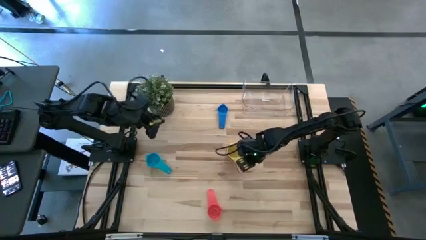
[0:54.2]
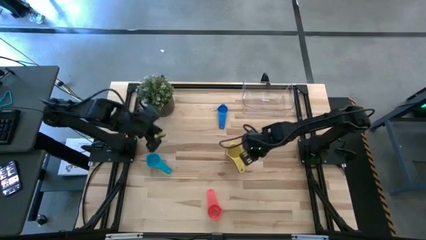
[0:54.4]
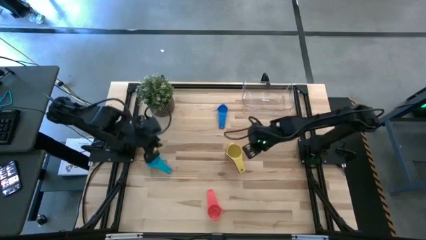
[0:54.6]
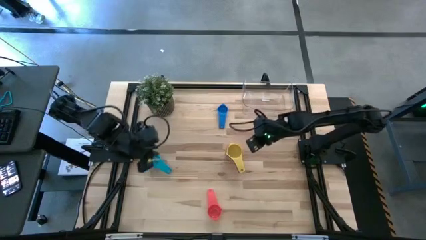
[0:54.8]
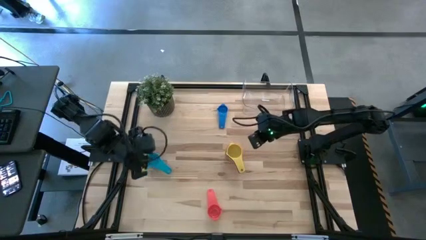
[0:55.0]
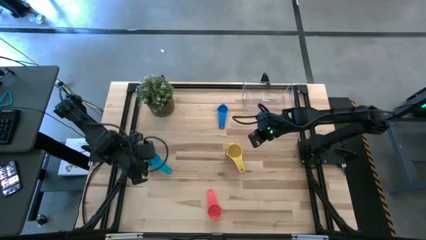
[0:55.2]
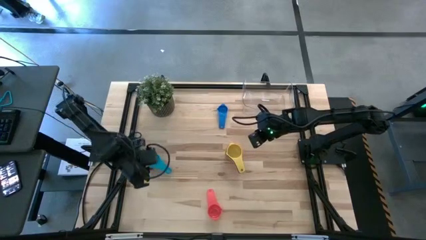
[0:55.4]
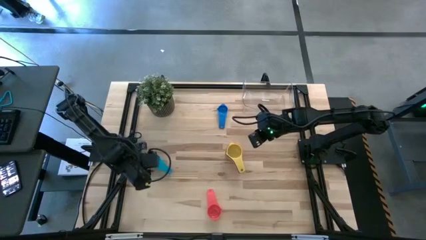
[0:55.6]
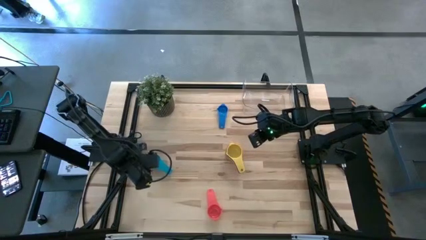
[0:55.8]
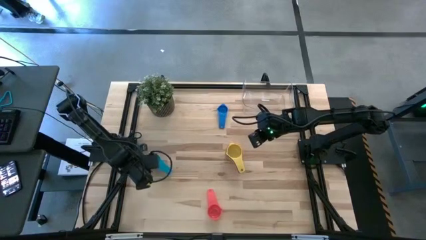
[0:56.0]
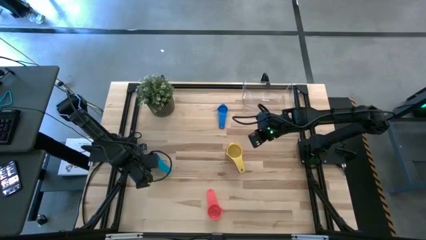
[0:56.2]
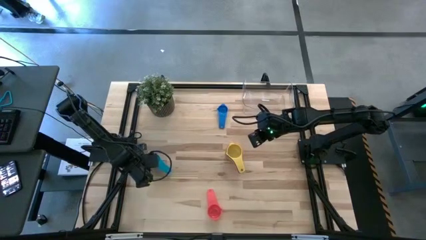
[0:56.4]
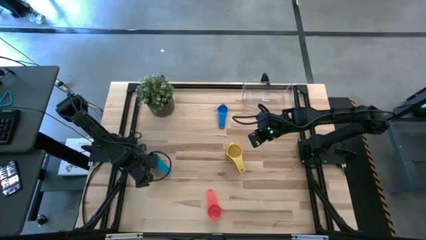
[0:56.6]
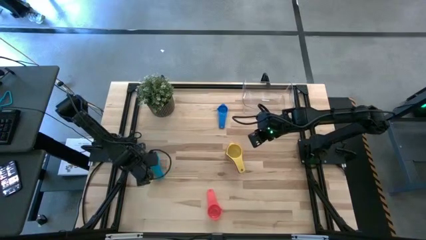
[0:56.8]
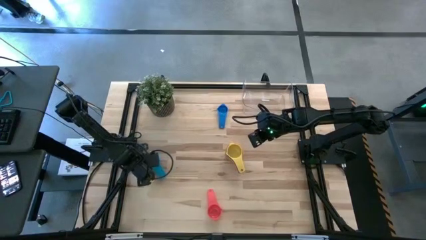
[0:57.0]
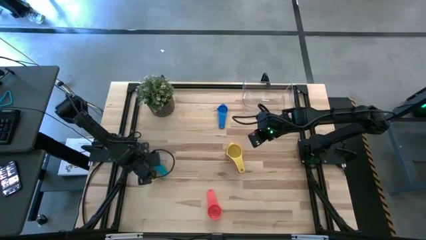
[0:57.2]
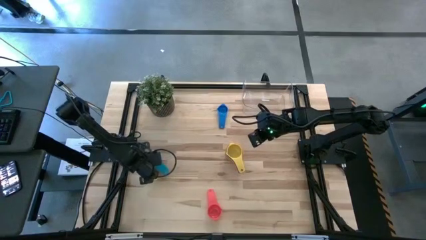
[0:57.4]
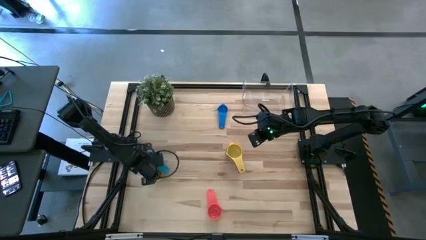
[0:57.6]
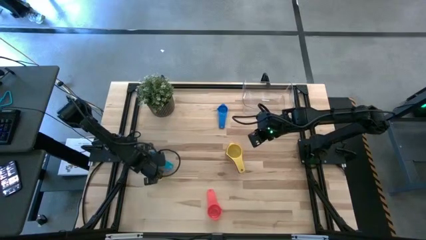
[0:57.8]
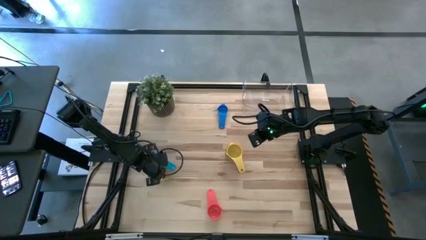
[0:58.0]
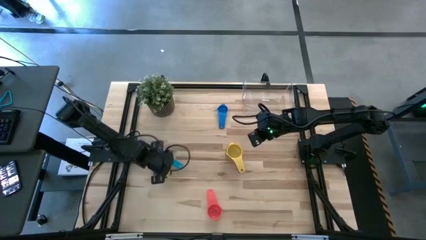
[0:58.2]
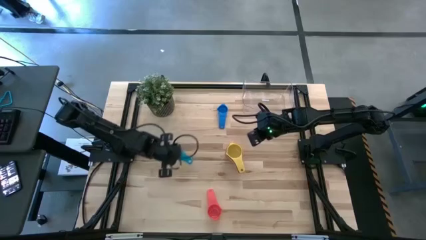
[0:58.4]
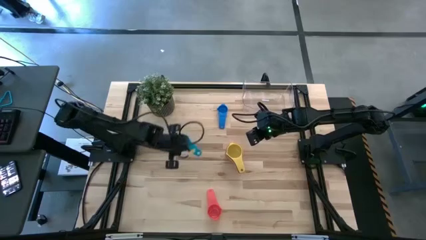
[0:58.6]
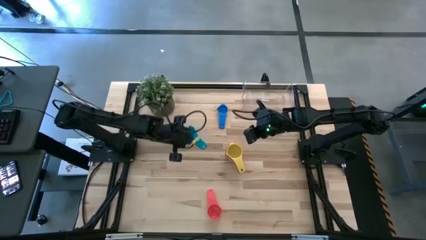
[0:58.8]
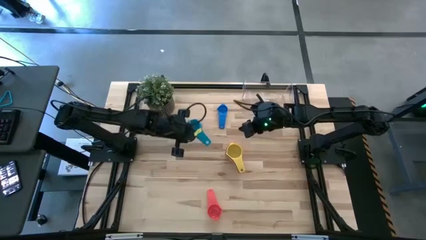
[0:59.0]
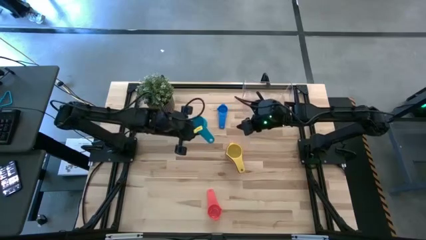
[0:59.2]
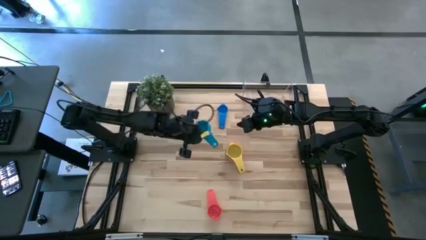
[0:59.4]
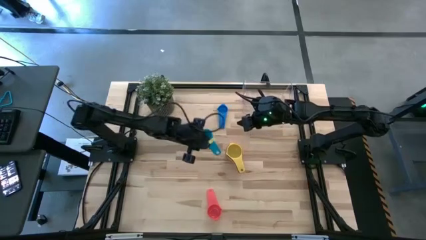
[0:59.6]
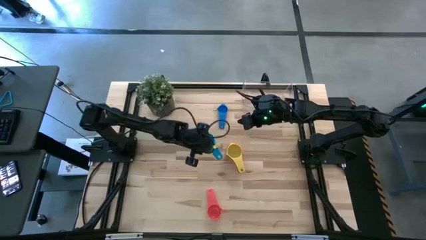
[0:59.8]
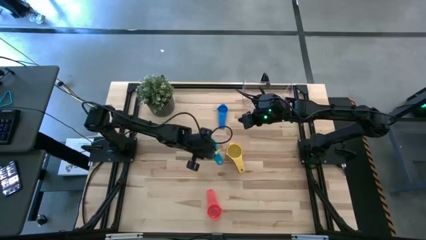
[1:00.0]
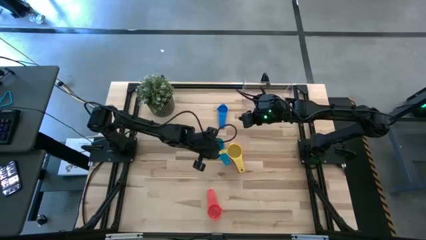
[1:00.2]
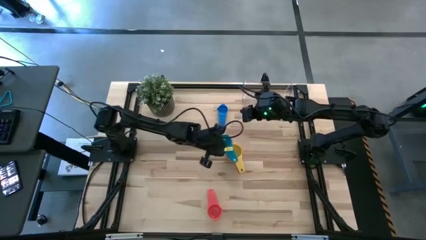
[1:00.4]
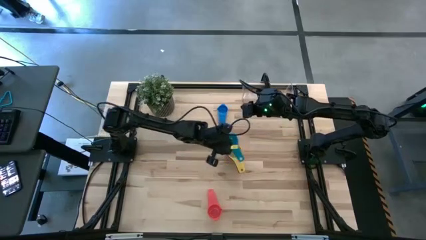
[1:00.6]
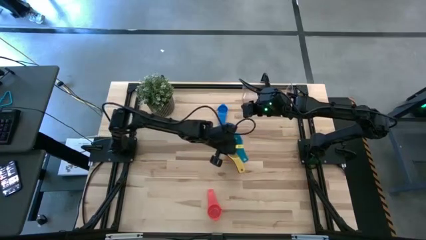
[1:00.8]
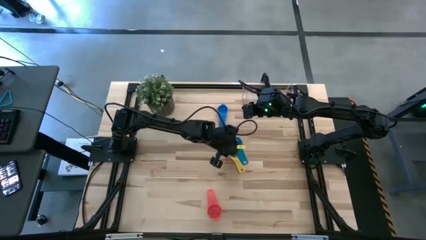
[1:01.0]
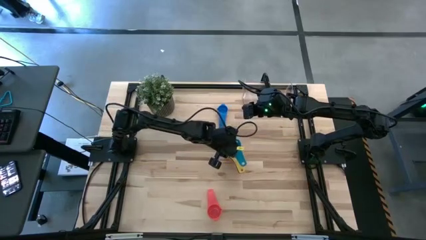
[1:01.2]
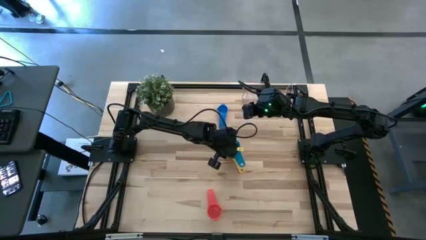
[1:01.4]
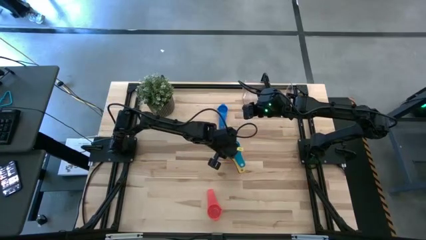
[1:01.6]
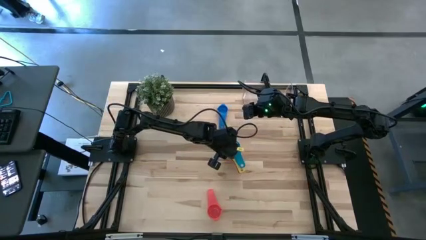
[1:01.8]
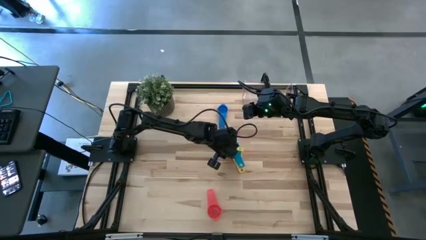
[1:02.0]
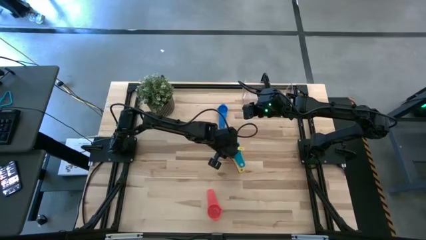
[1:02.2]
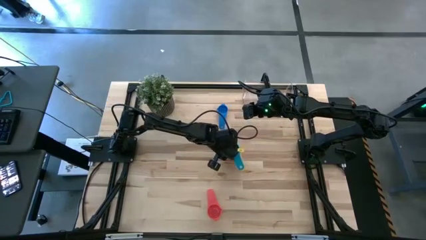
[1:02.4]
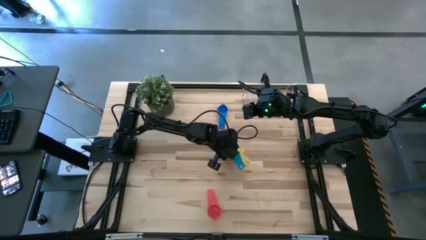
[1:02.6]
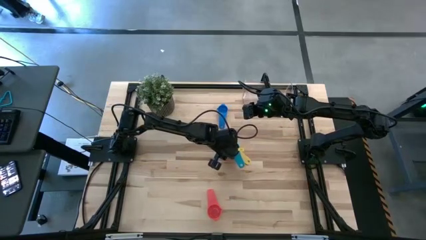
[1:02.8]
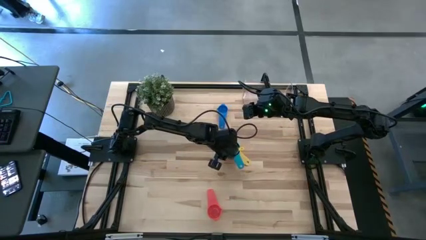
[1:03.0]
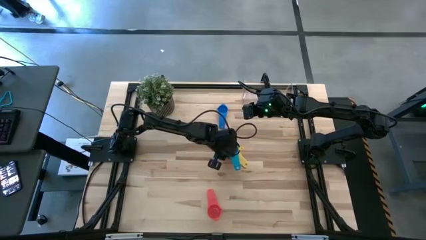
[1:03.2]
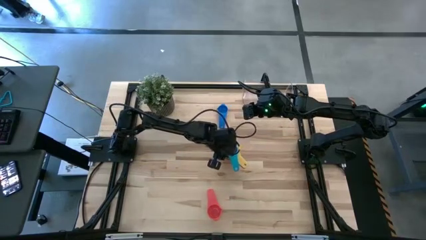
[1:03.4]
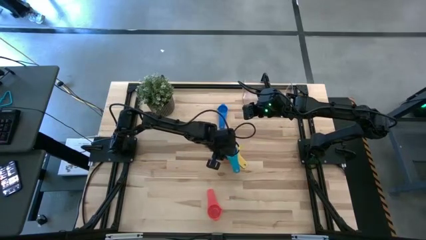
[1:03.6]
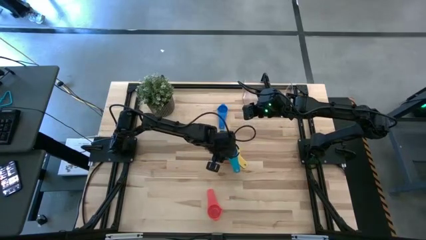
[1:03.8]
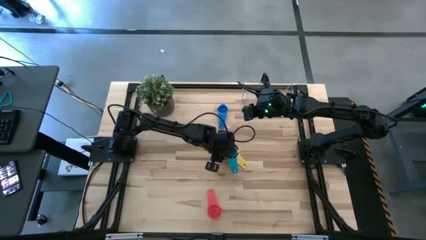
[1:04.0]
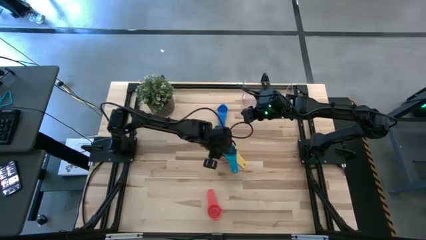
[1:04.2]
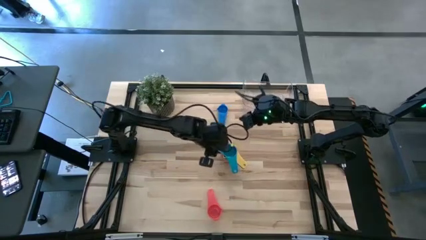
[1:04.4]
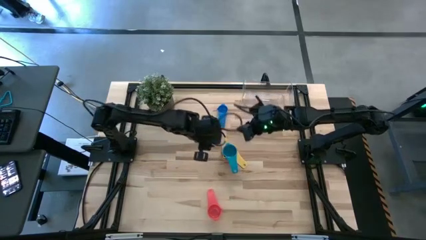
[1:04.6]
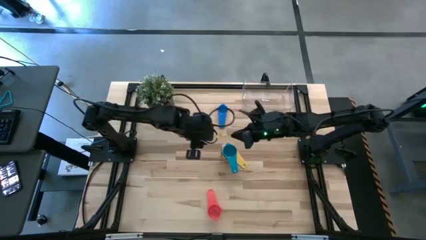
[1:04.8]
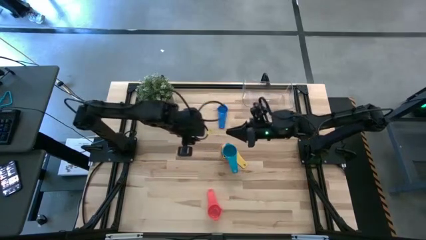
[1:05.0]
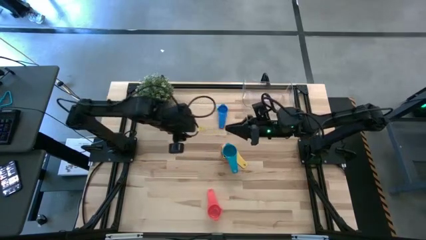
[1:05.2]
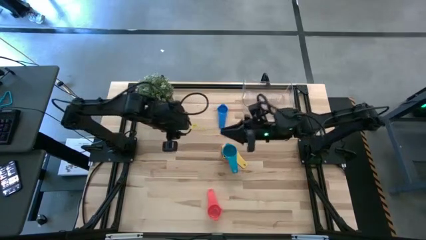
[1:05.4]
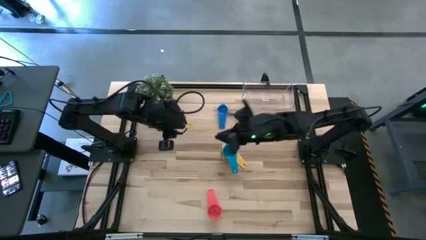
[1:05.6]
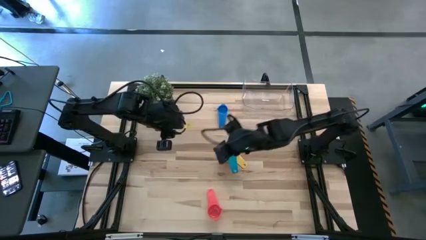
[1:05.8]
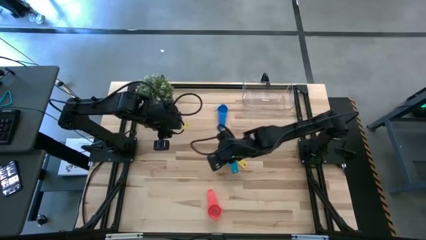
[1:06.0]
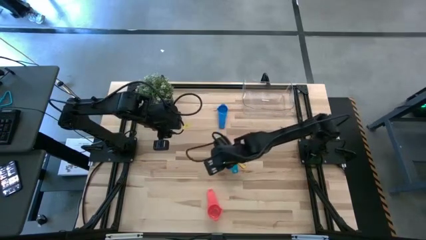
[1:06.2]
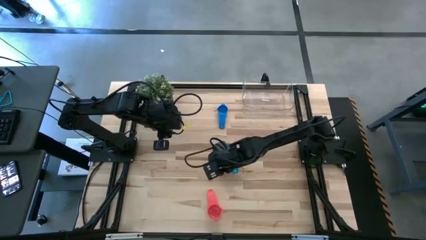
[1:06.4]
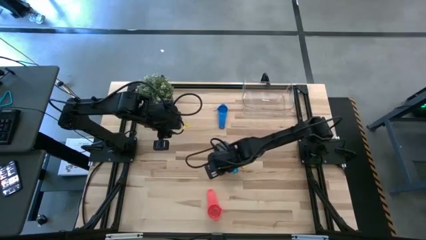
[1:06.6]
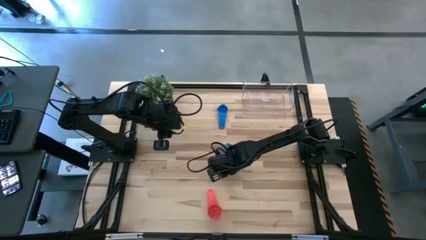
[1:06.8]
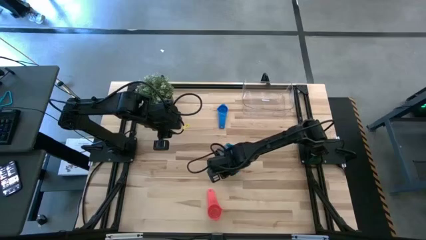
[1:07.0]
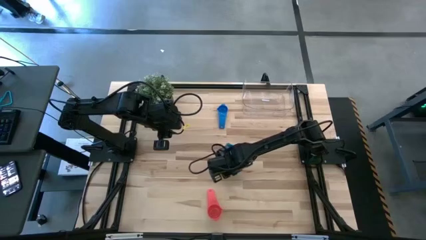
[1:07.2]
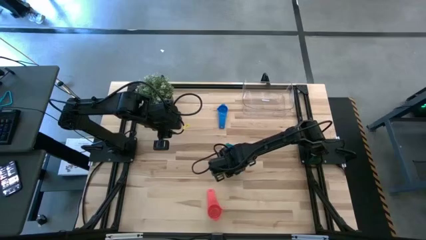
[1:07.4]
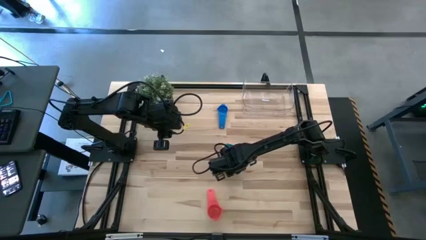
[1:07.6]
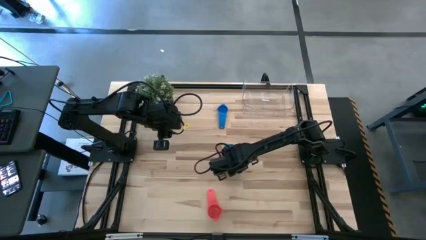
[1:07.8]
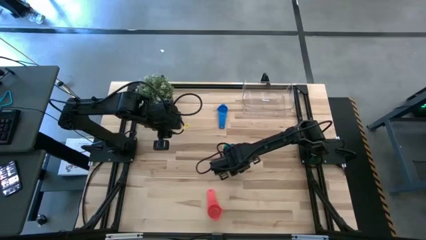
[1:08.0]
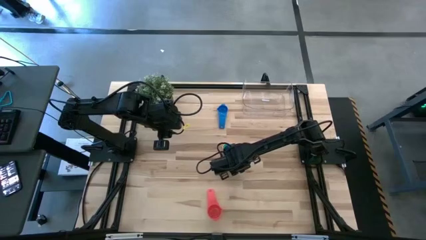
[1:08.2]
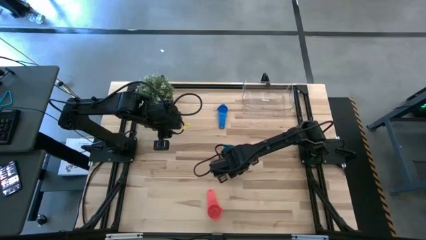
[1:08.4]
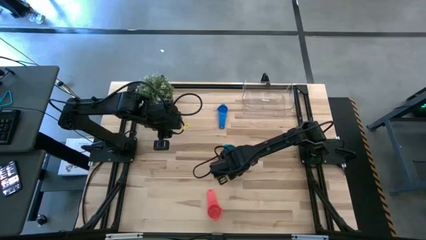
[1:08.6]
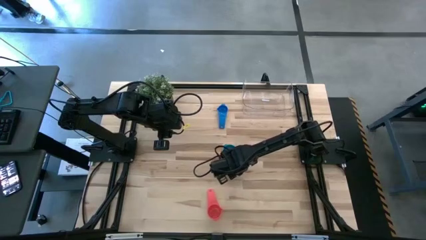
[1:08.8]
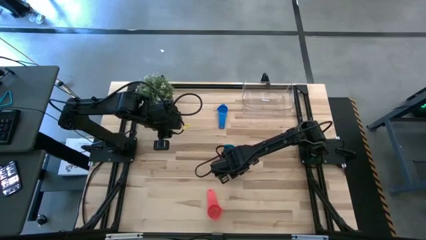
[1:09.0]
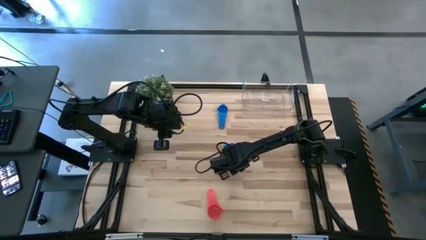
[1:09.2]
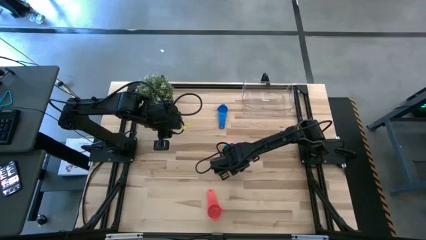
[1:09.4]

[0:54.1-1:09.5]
Task: Nest measuring cups in basket
Stack the light blue measuring cup on top of the yellow measuring cup

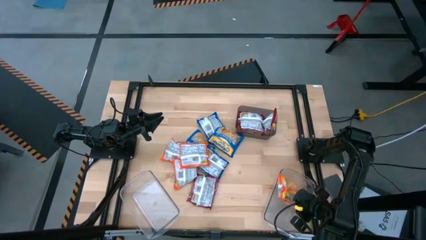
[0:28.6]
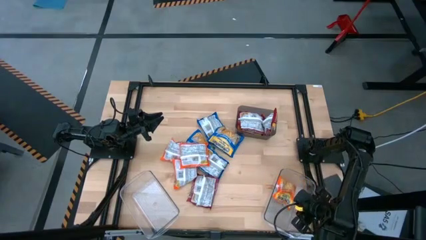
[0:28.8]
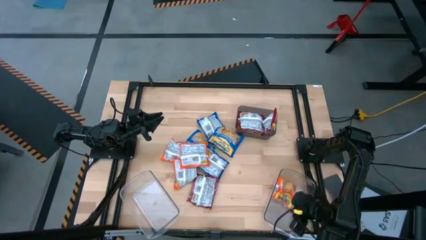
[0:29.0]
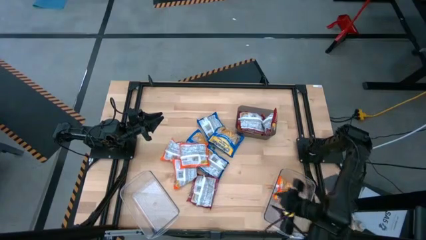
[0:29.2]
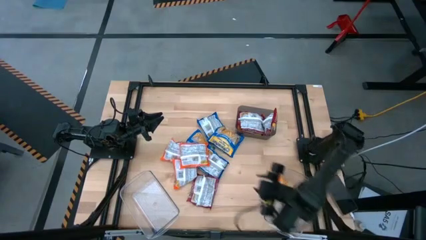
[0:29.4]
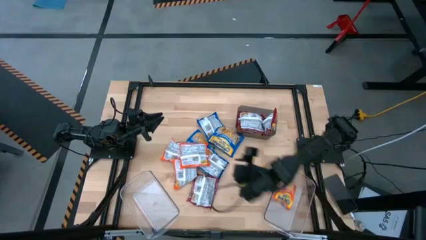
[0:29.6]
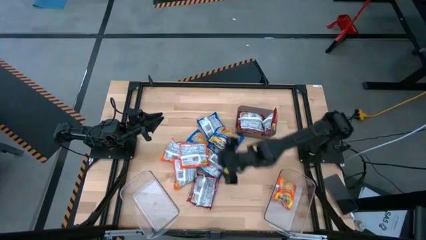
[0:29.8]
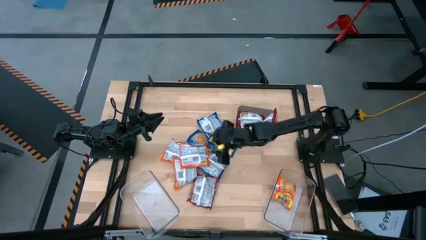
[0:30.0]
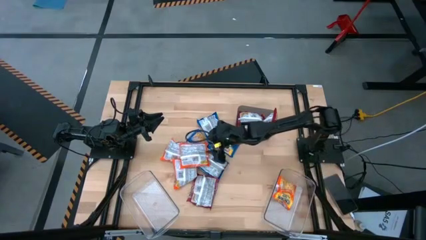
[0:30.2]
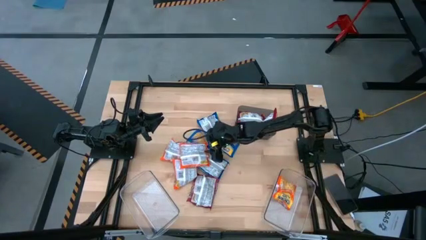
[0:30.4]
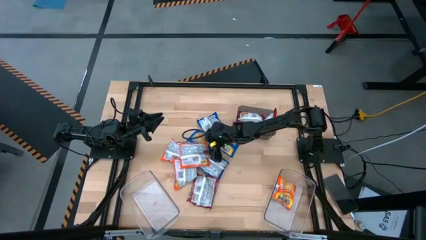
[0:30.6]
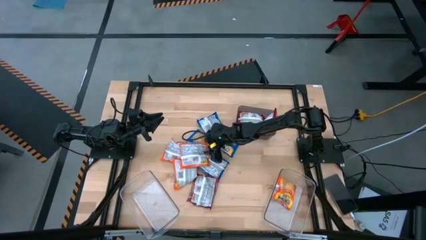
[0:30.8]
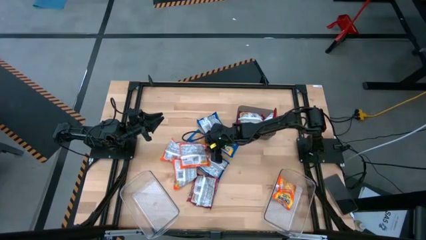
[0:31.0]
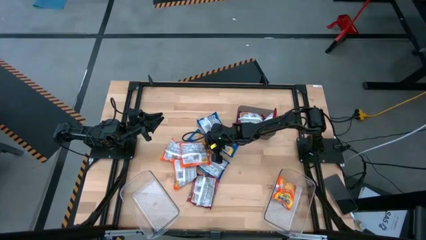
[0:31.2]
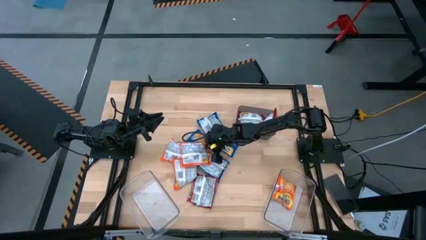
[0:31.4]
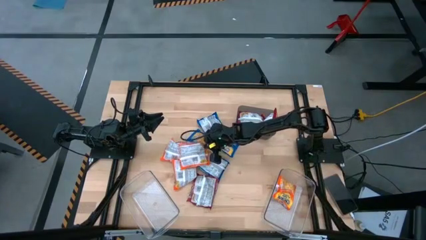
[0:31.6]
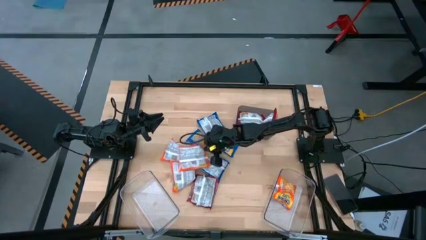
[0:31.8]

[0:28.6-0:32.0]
Task: Sort Maruchan noodles
Put the orange noodle pack into the right transparent bin
